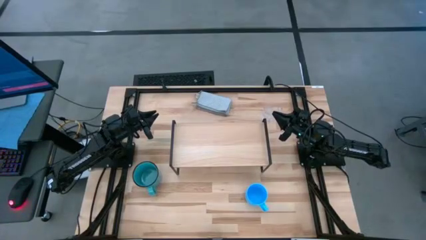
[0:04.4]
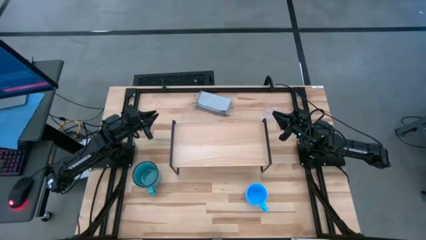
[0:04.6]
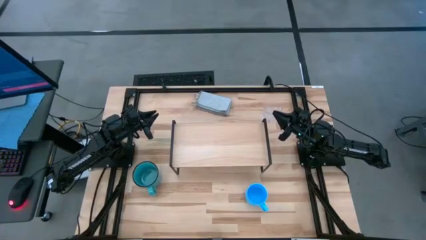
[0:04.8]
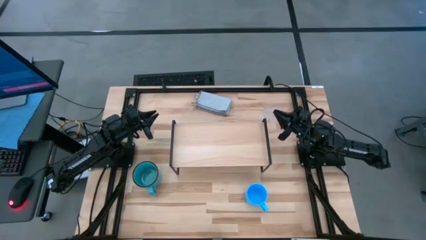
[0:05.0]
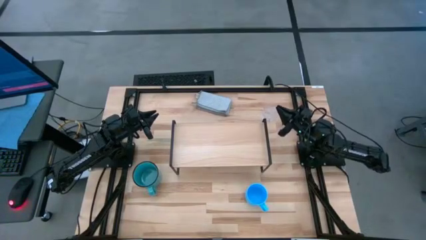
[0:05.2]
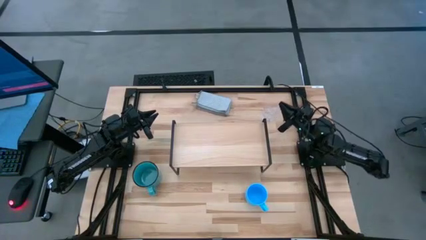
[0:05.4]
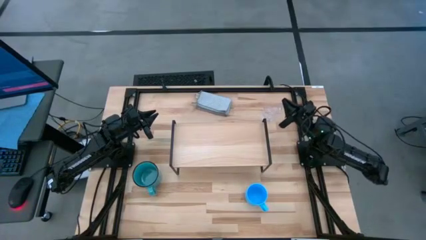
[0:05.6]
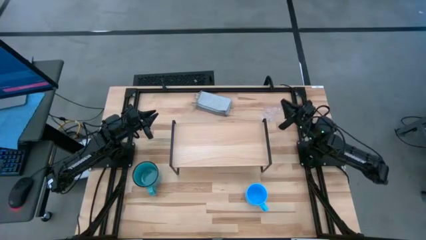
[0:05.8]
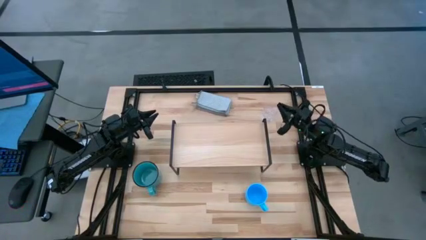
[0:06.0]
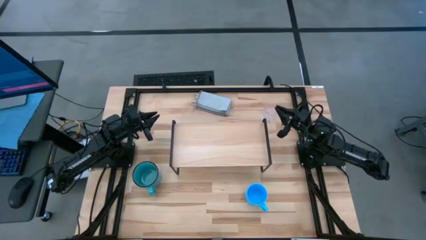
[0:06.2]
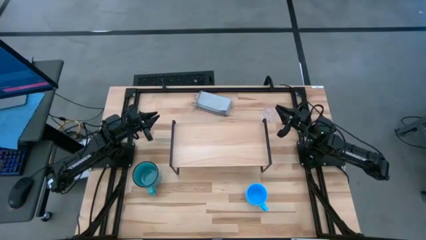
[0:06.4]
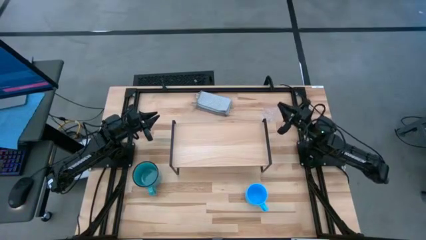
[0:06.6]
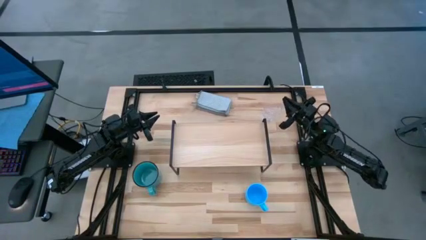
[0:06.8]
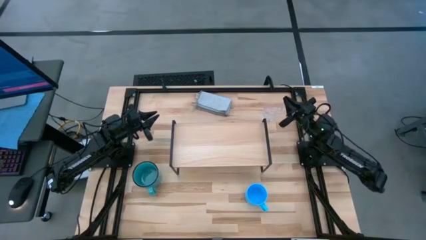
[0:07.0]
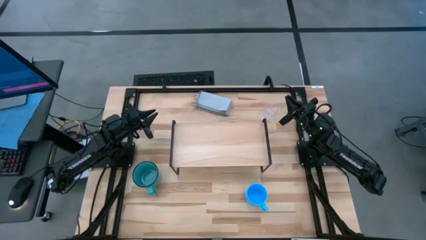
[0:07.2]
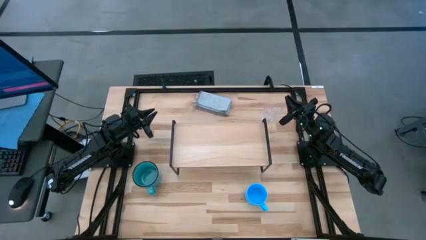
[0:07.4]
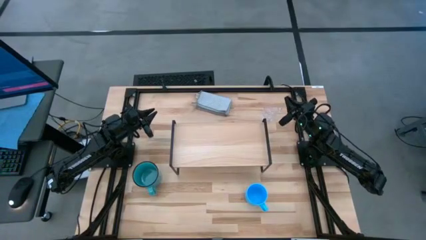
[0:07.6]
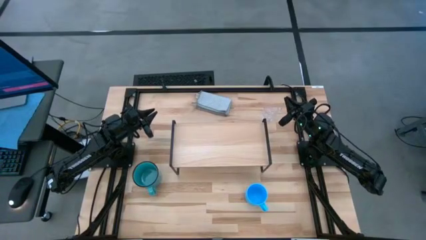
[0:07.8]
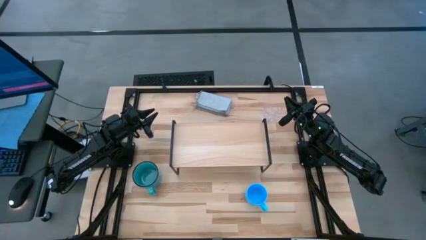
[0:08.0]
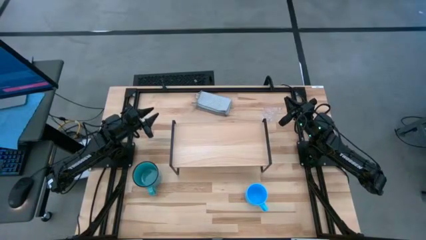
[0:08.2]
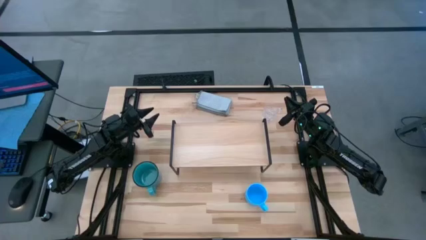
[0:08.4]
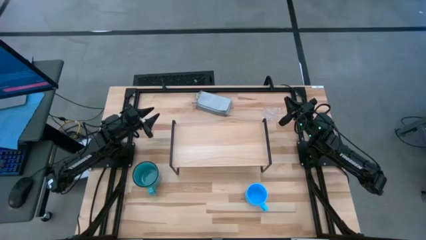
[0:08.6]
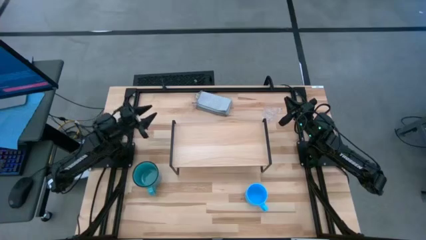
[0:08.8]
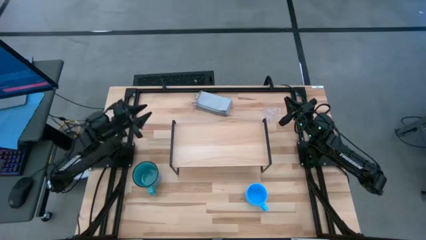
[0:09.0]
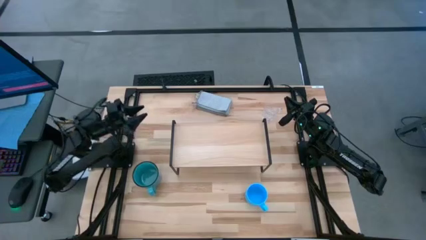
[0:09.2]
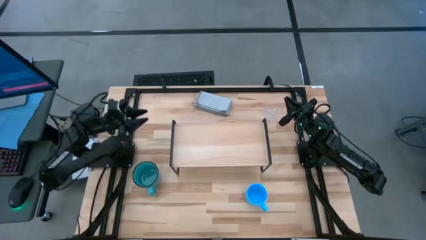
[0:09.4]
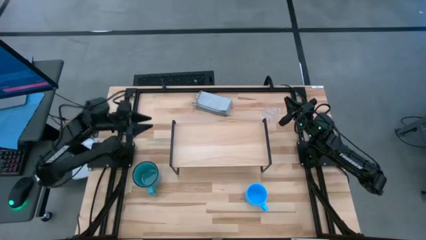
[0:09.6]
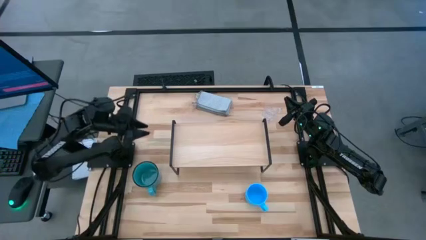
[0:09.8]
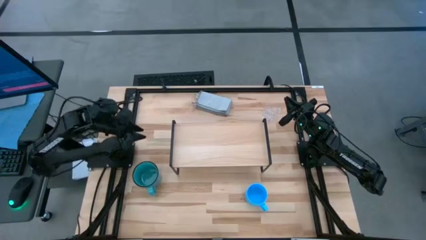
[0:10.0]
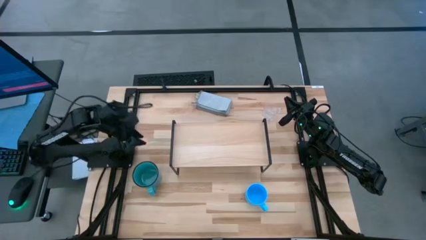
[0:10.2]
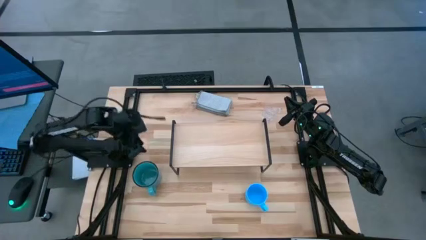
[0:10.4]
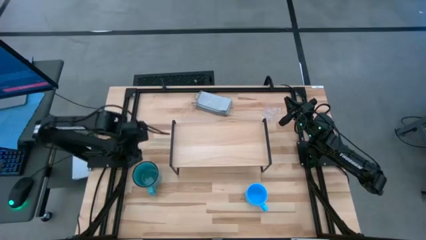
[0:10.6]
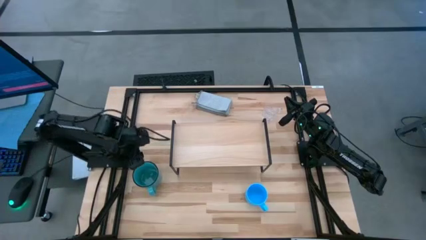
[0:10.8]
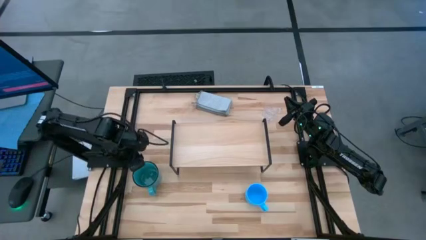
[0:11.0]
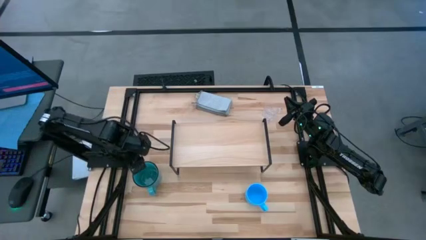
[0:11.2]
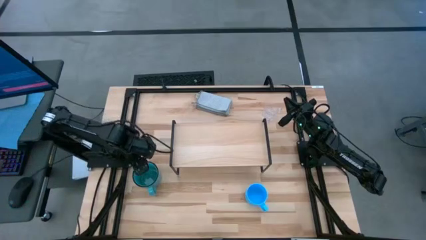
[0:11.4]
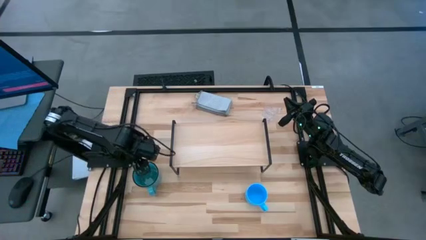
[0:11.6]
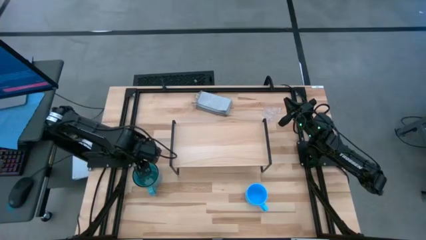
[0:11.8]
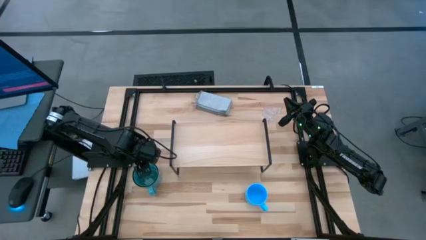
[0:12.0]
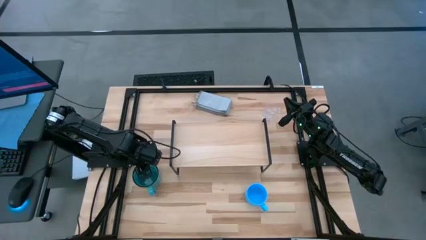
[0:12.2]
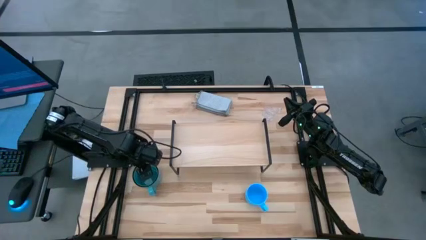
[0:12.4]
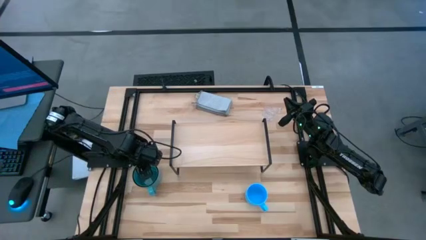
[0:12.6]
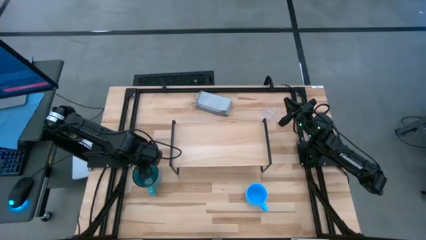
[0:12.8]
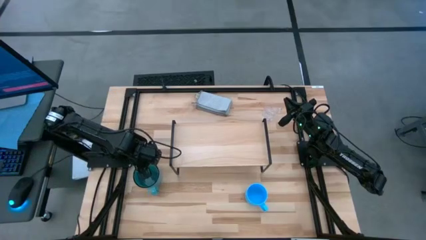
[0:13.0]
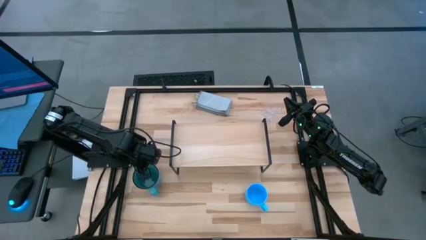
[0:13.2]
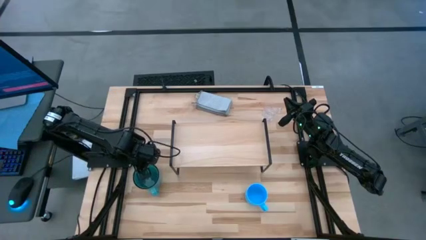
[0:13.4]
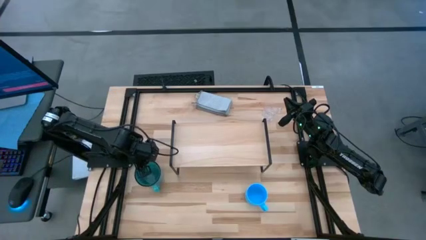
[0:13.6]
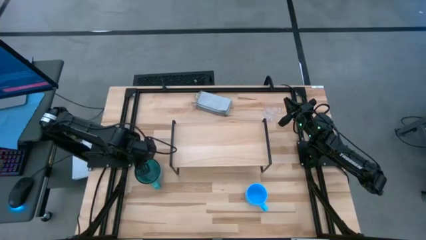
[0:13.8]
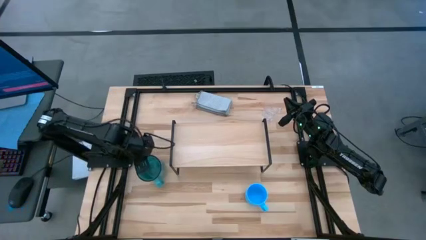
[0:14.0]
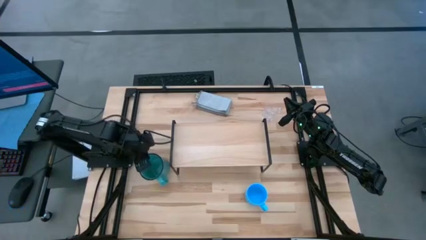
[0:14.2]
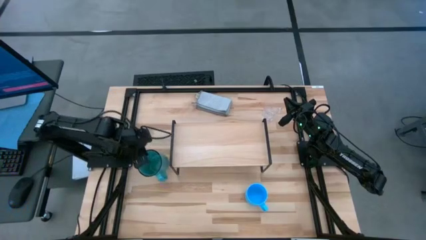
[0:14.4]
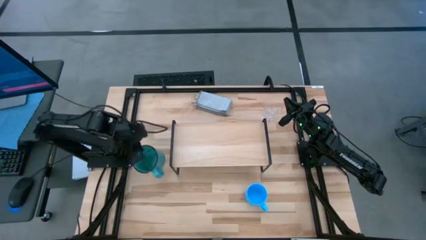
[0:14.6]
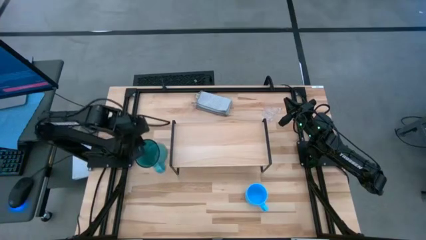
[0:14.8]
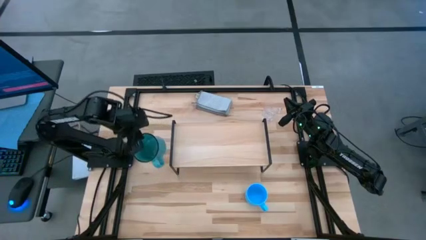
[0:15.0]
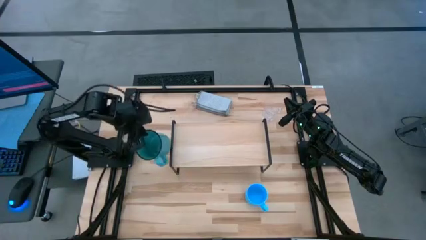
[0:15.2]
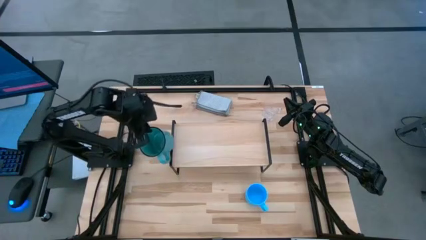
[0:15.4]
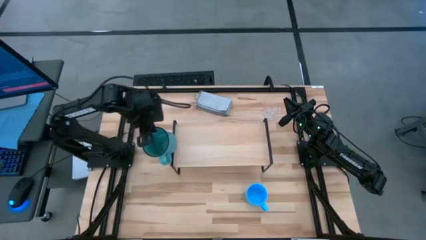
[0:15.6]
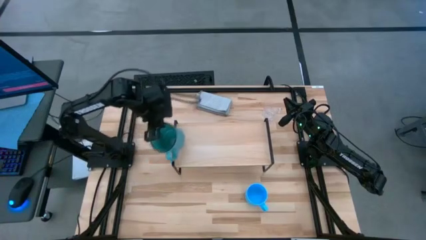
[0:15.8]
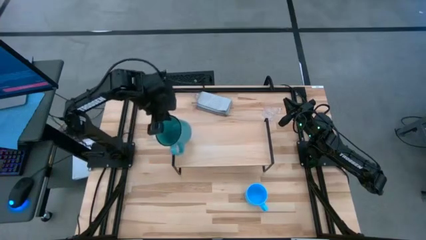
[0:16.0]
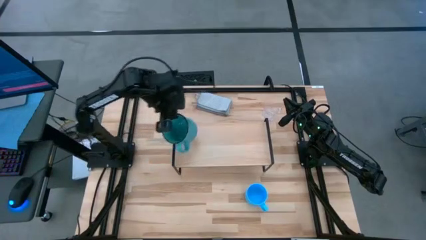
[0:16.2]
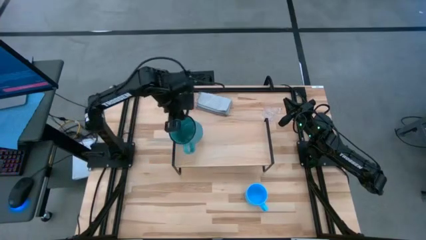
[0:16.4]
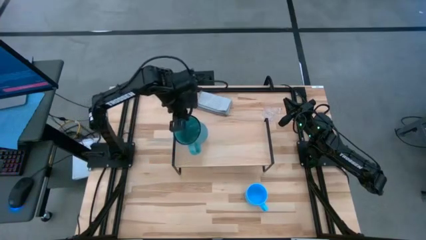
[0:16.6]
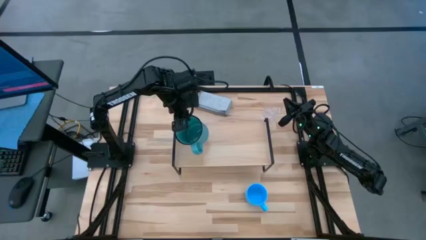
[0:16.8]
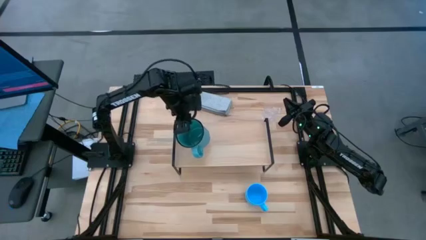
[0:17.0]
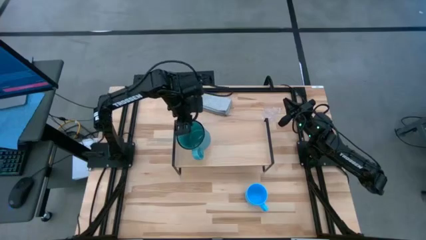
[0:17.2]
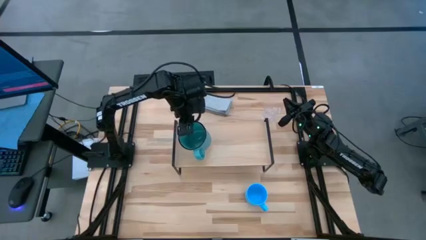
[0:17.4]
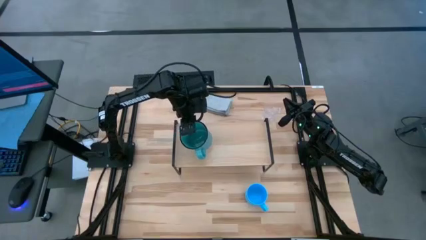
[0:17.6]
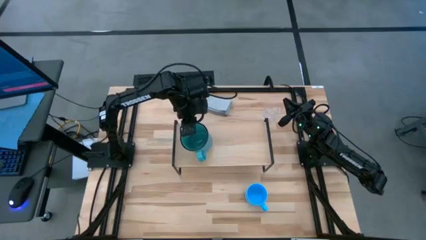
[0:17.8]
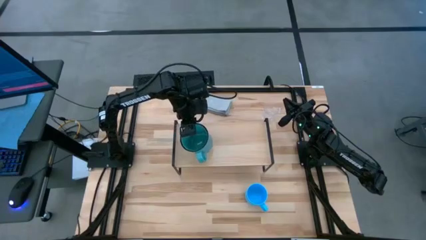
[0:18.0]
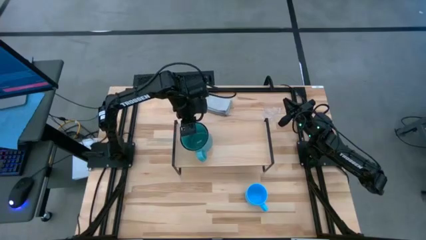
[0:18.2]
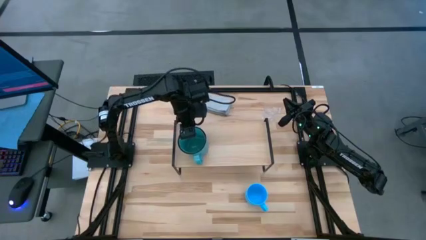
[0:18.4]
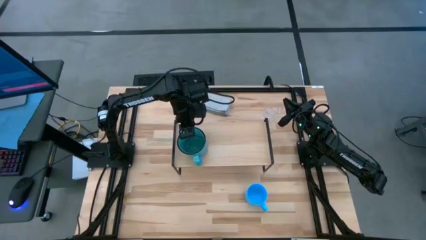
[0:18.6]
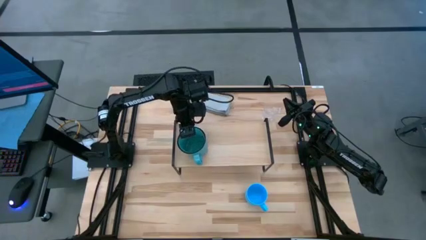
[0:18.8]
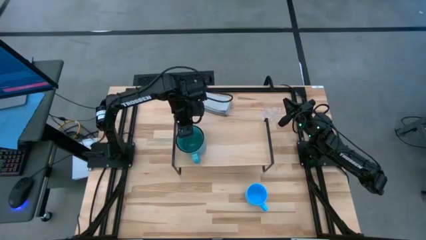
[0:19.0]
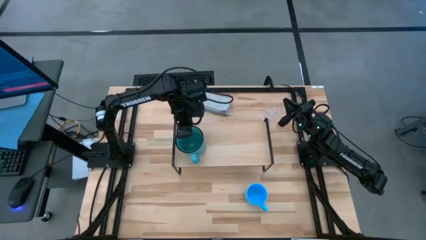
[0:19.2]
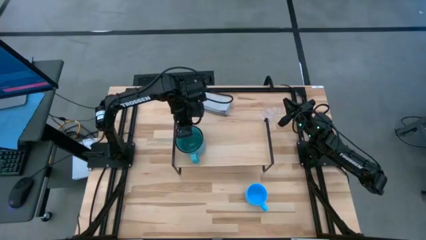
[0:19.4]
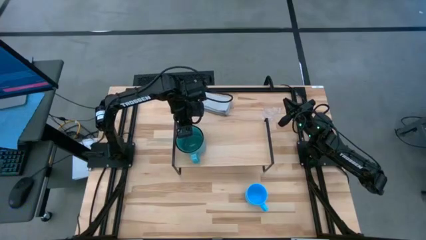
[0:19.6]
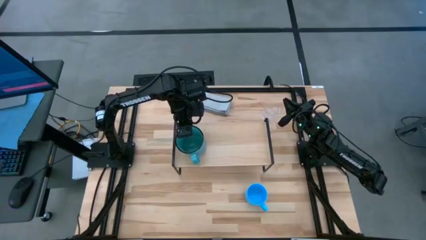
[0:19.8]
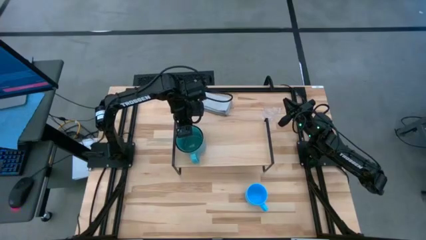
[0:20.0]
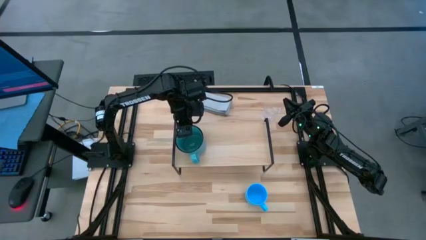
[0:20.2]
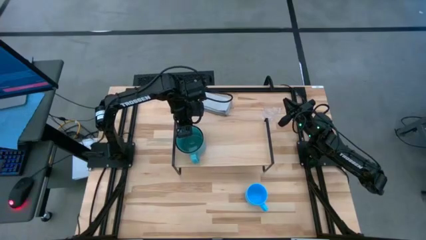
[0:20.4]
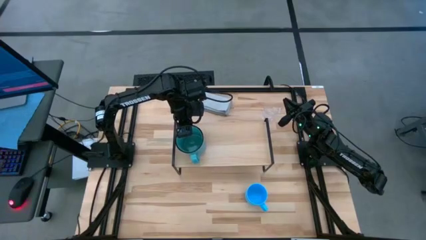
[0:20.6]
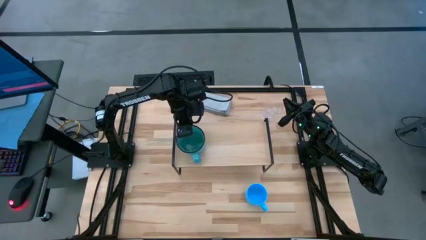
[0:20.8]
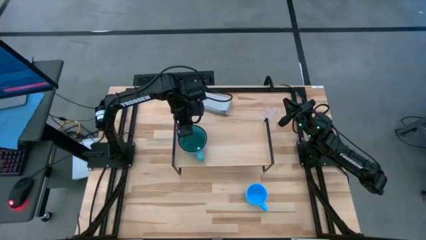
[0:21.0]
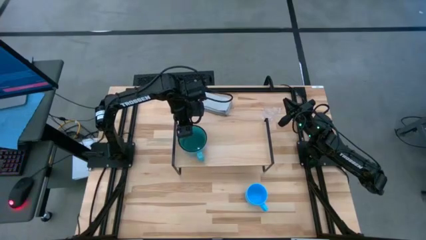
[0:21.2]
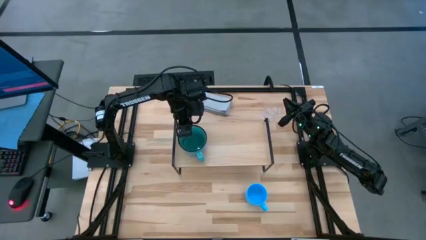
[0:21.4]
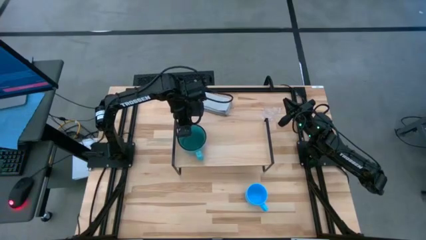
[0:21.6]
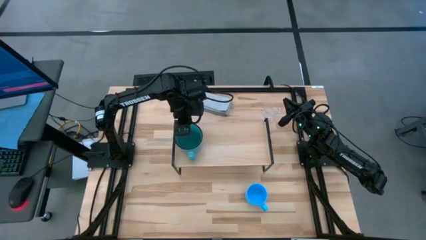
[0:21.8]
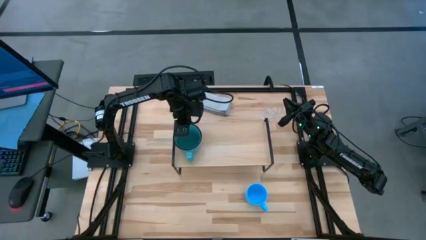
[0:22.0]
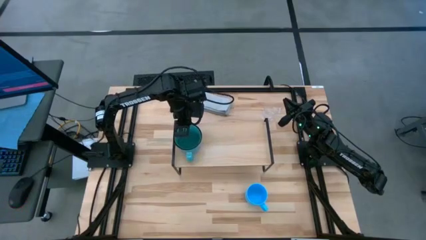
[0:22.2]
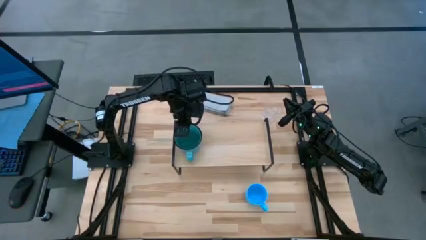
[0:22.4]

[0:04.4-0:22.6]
Task: Stack small to large cups/mugs on shelf
Put the blue mug on the shelf
